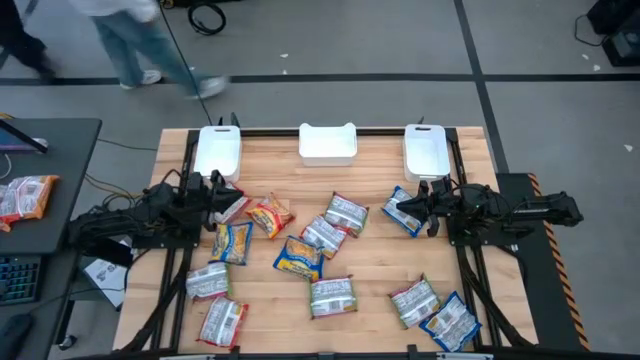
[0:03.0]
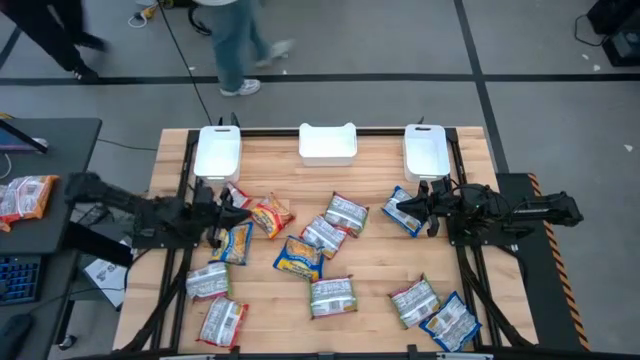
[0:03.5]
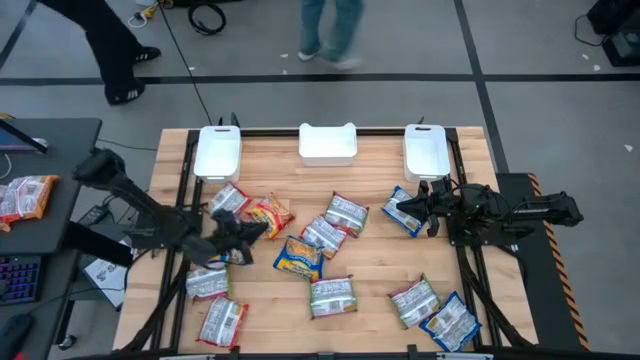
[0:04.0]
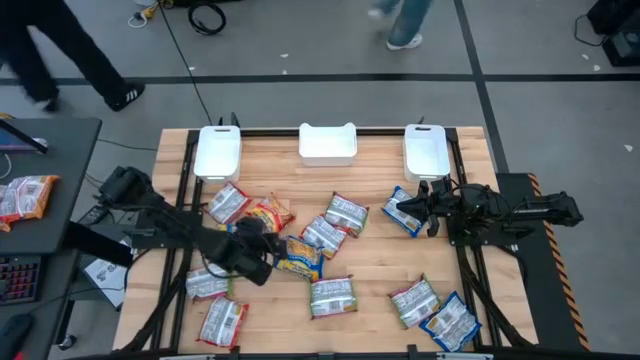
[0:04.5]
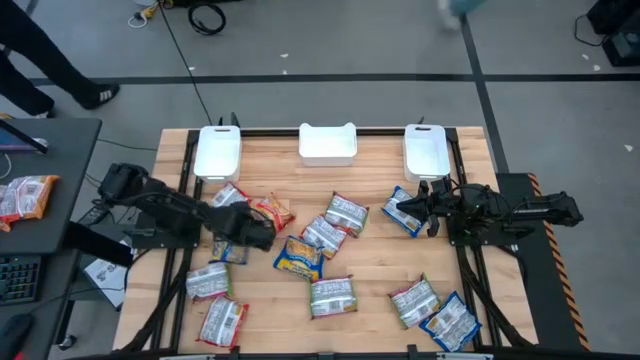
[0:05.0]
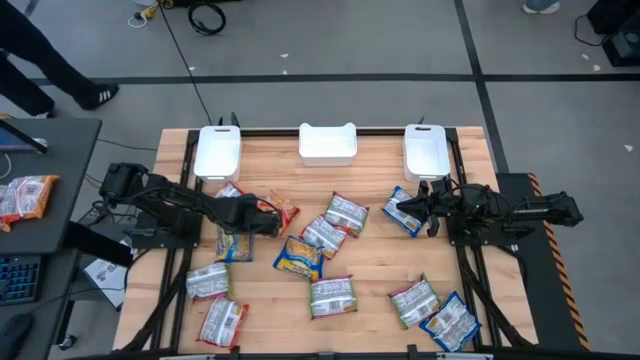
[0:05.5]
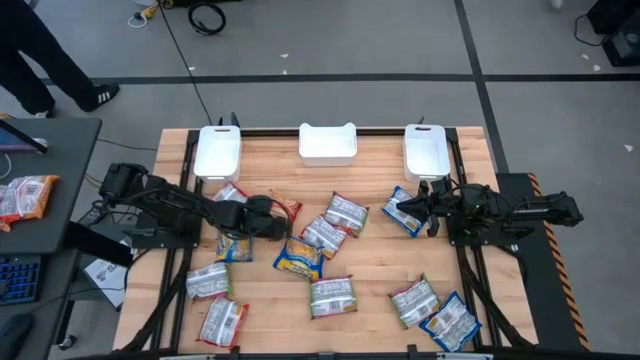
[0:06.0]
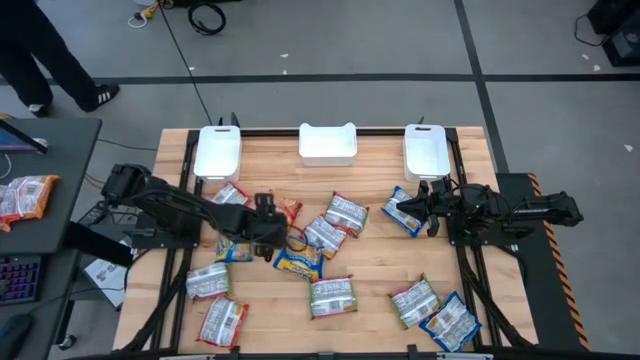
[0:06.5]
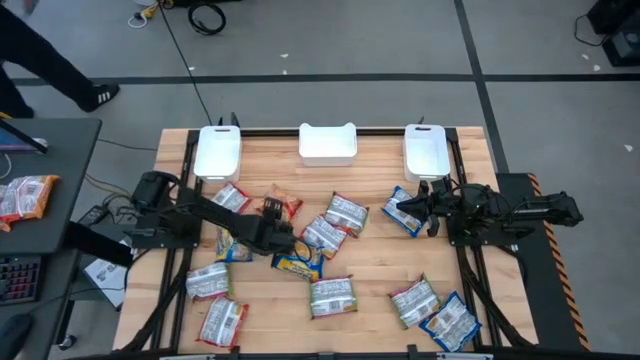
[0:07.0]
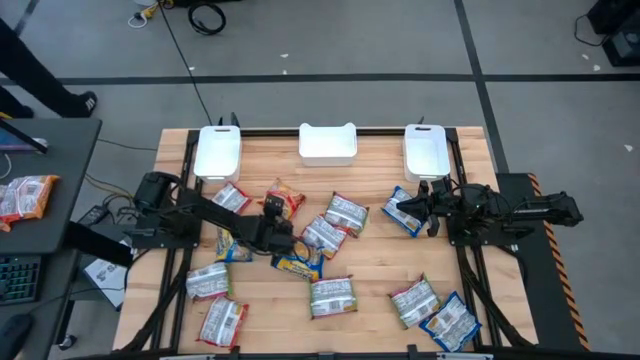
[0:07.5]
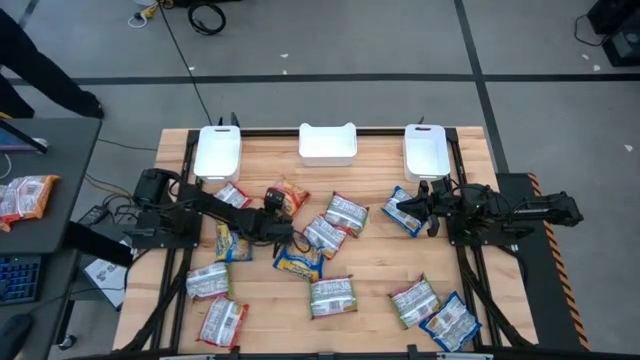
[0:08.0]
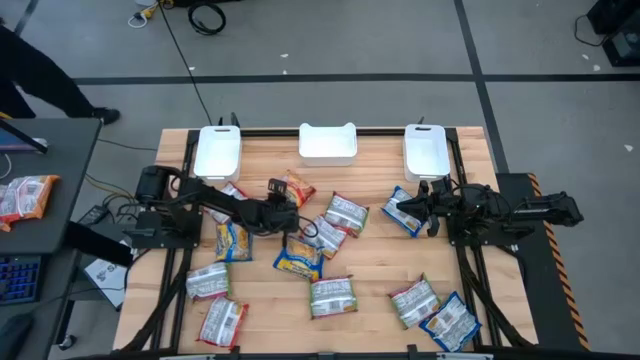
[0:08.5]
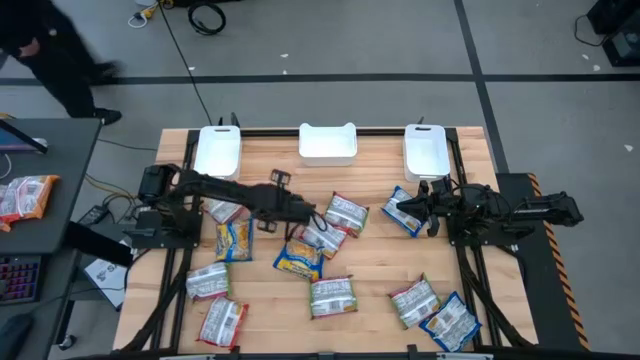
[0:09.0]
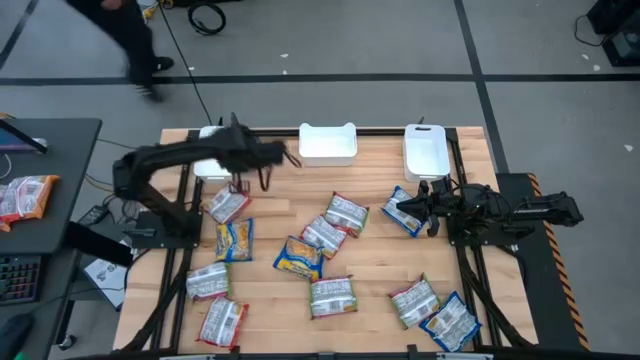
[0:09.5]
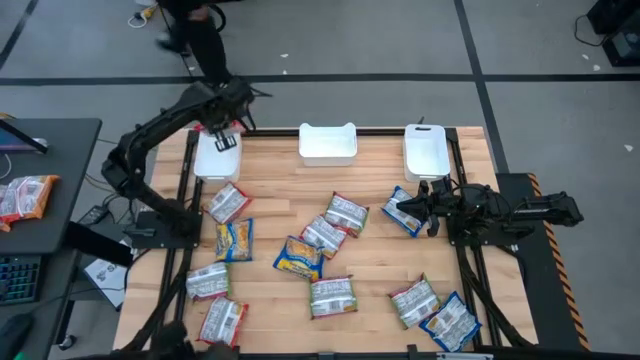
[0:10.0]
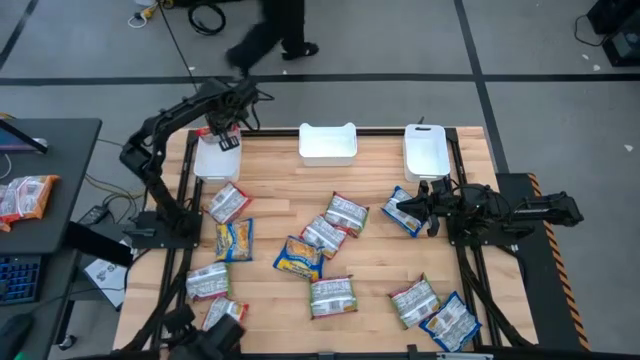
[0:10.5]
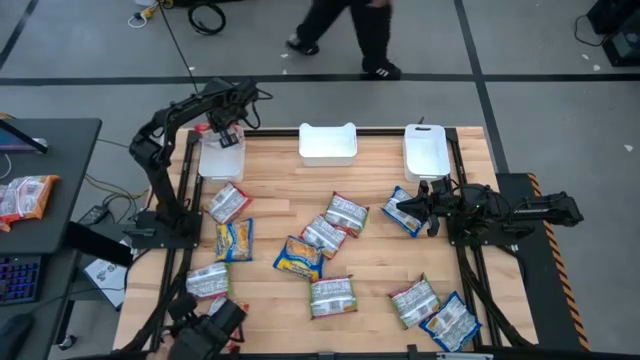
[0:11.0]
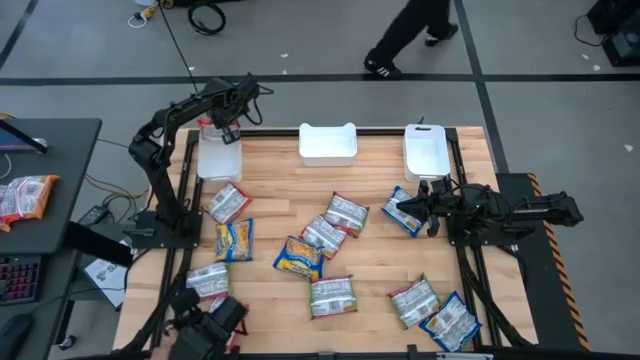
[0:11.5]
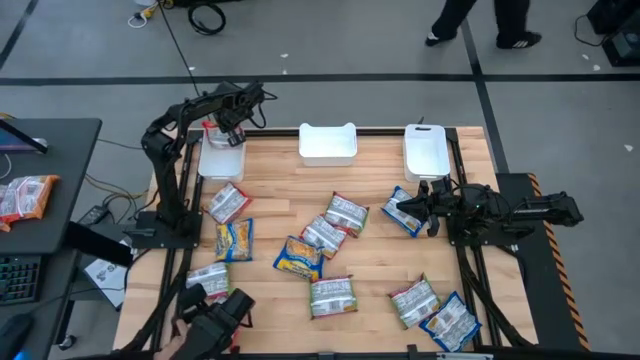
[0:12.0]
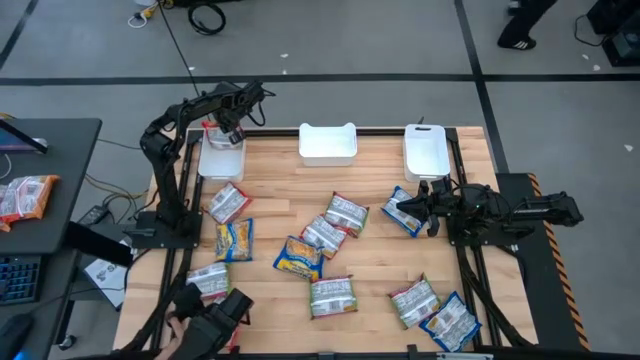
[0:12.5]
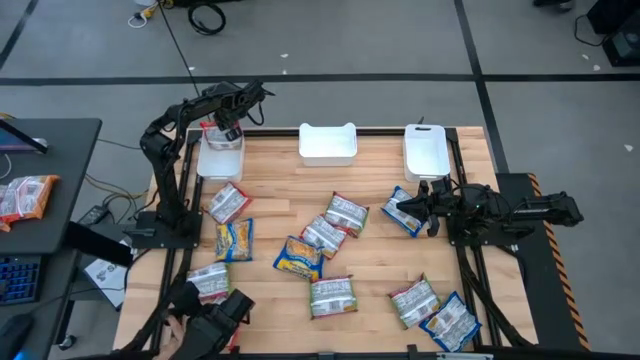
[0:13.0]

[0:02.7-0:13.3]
Task: Sort Maruchan noodles
Put the orange noodle pack into the left white bin

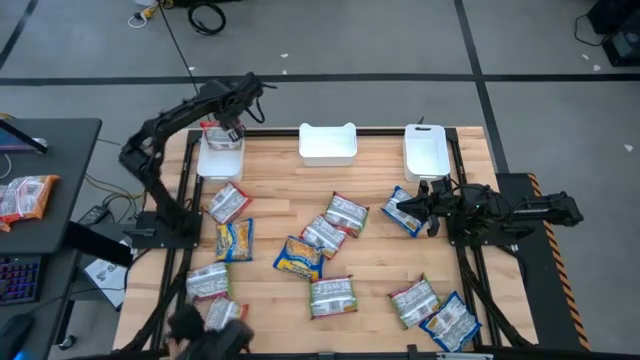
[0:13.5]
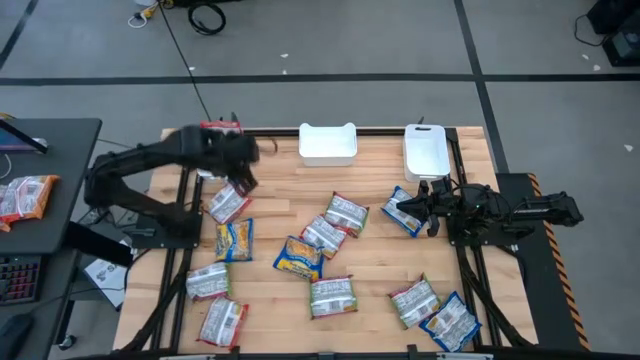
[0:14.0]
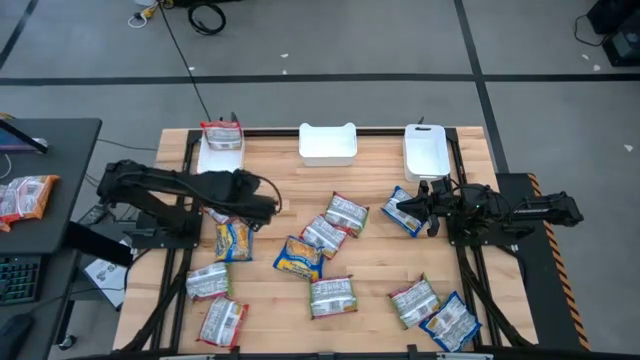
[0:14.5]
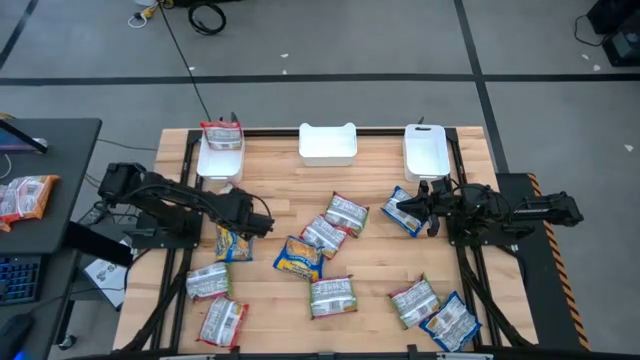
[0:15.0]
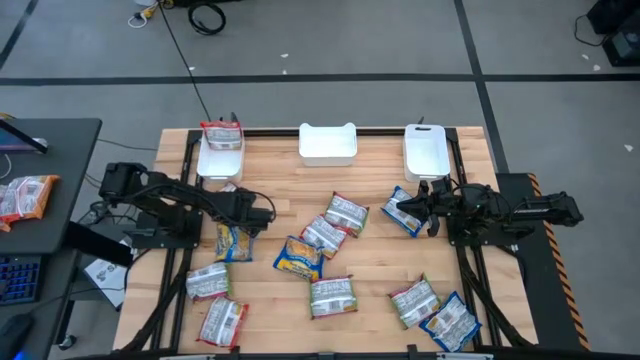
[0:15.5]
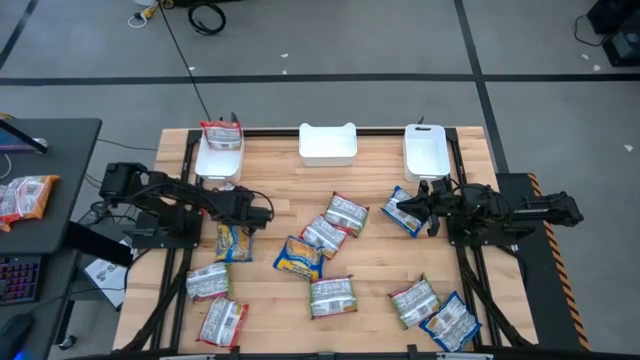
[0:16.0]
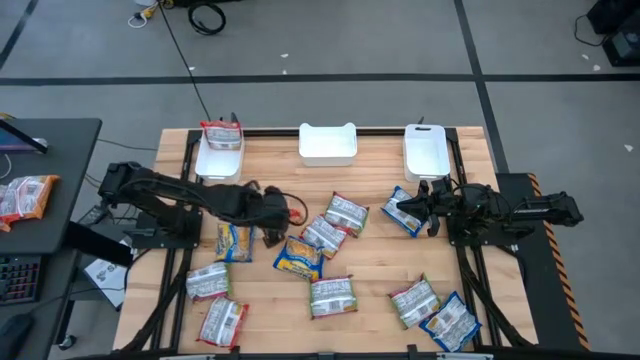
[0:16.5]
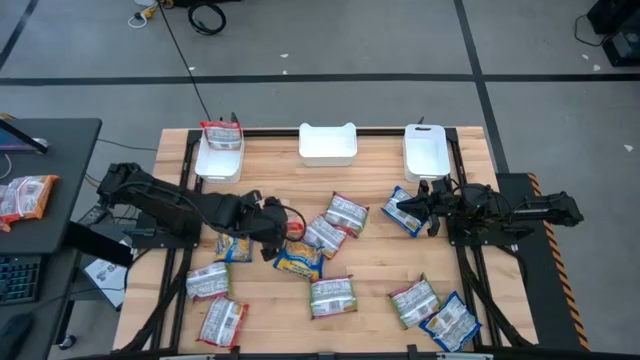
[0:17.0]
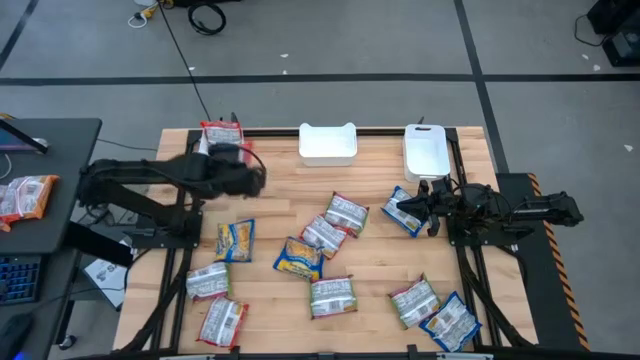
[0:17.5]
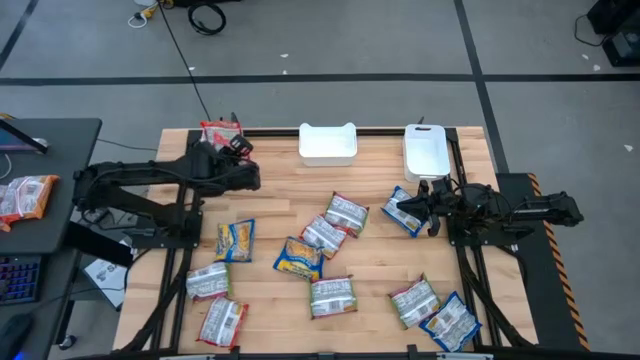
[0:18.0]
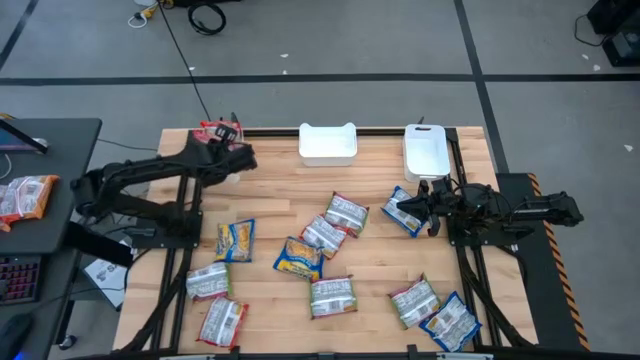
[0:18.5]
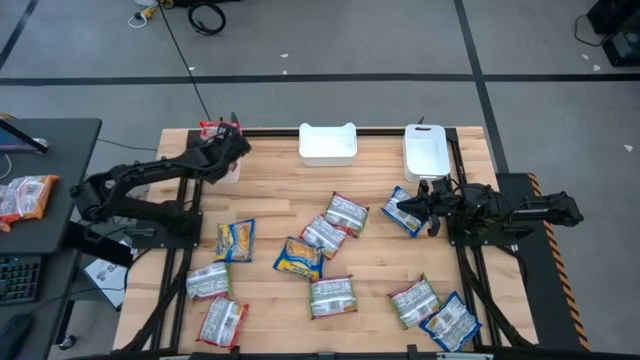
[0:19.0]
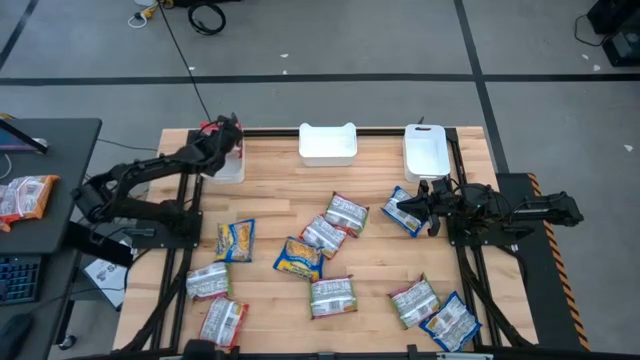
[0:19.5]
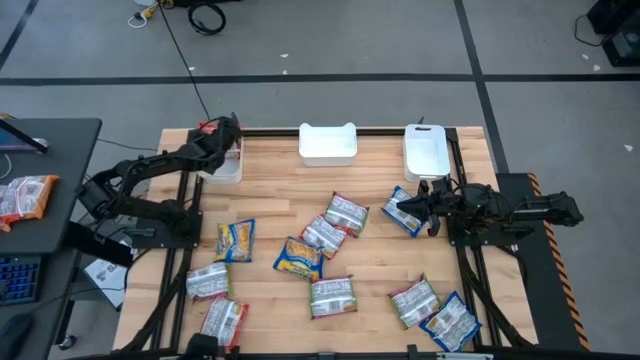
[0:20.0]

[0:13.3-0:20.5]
Put the orange noodle pack into the left white bin

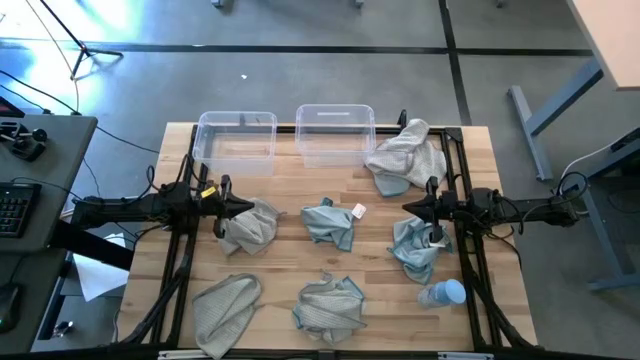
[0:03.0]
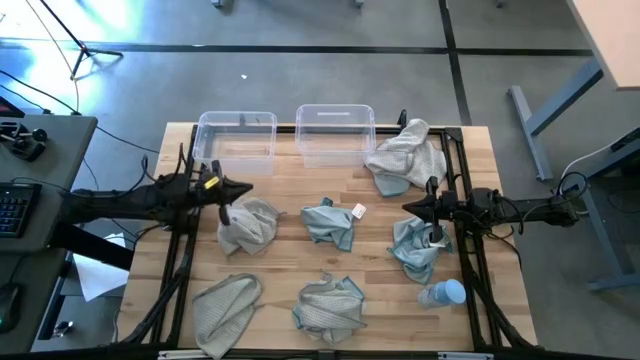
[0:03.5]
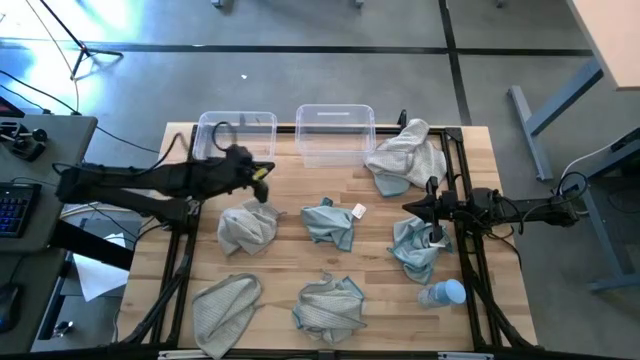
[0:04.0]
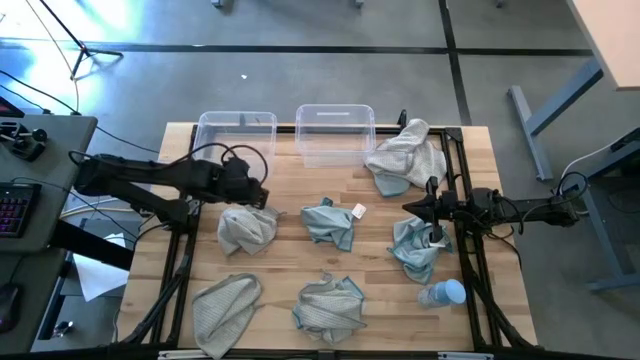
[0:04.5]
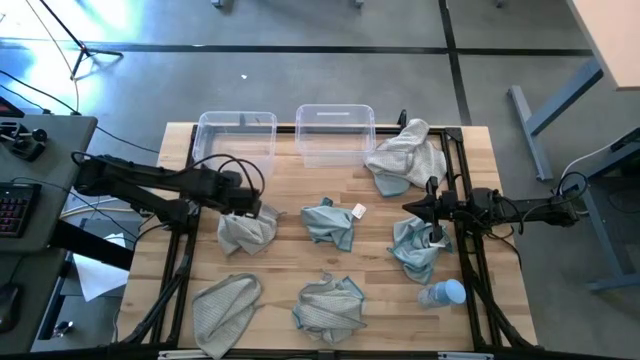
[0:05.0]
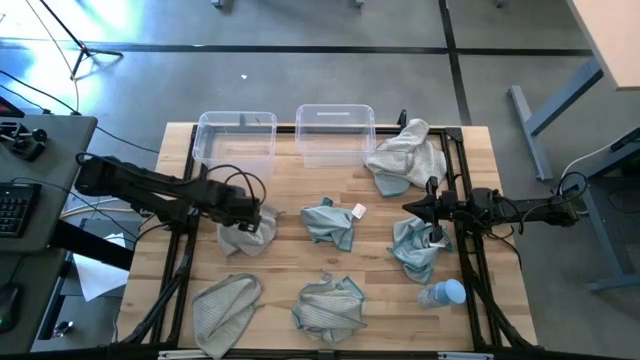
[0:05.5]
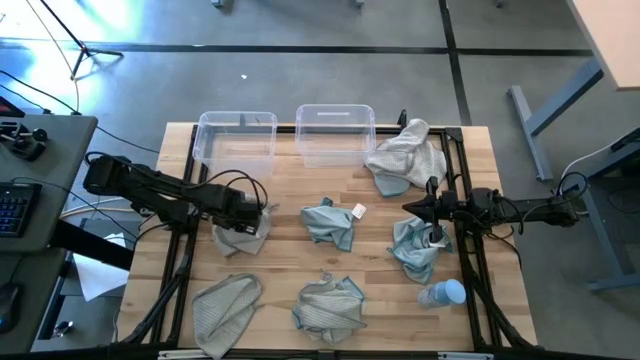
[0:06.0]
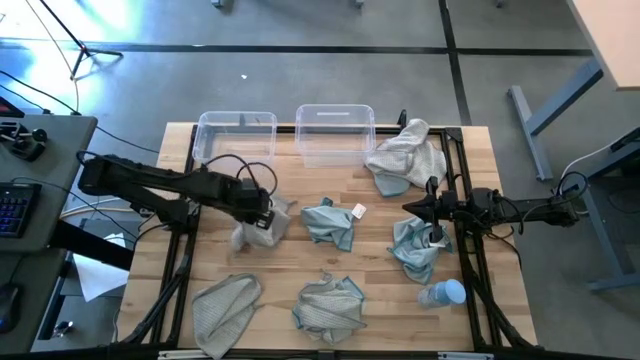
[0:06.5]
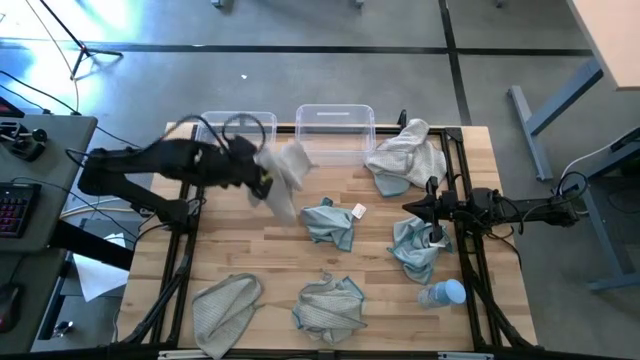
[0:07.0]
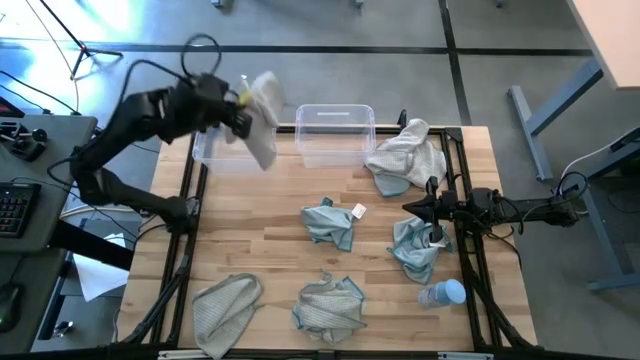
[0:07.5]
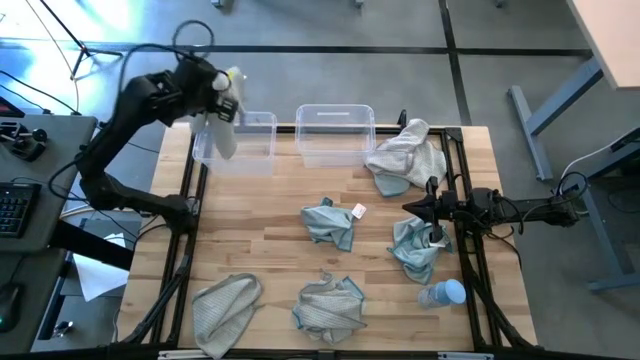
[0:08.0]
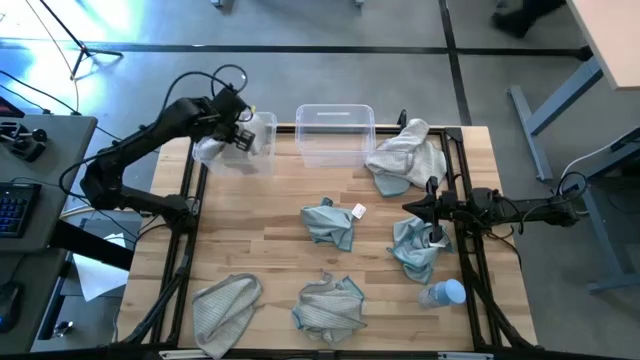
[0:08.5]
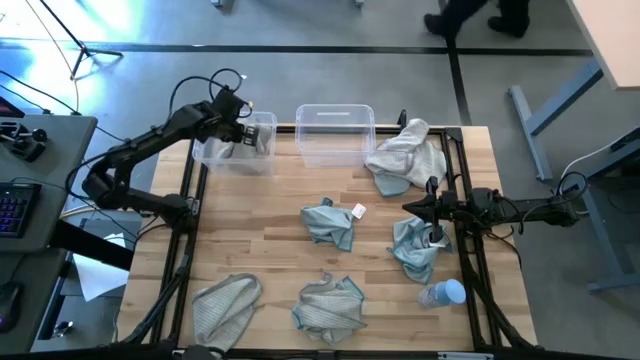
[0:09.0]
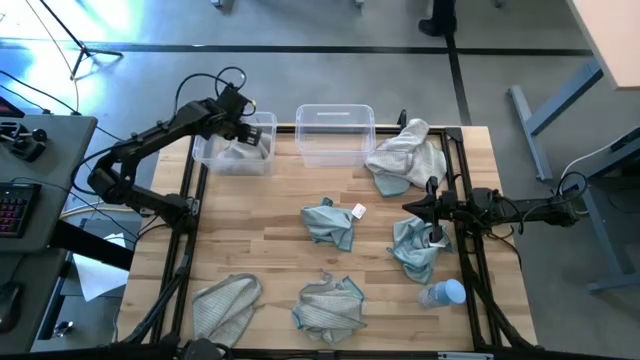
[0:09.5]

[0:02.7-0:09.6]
Task: Sort microfiber towel by color & place in baskets
Put the middle left gray towel into the left transparent bin
